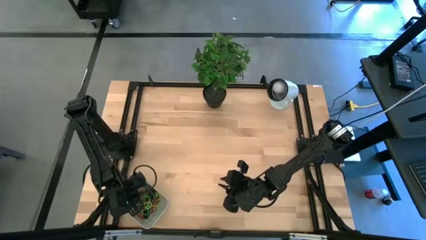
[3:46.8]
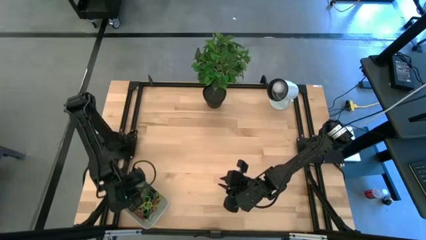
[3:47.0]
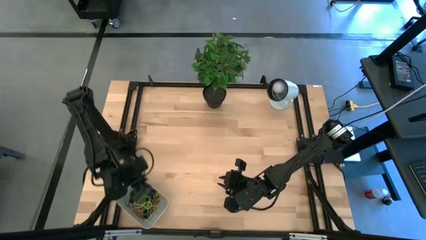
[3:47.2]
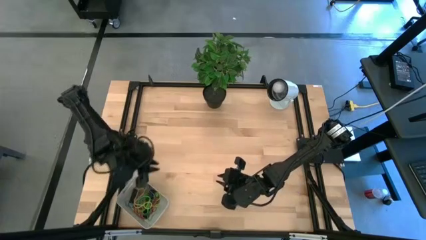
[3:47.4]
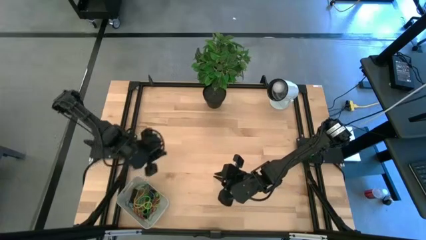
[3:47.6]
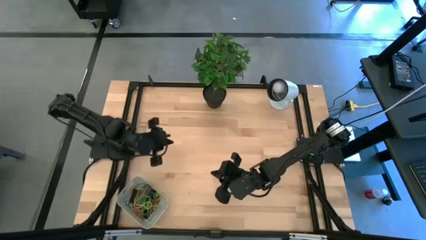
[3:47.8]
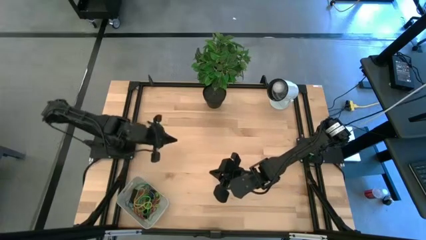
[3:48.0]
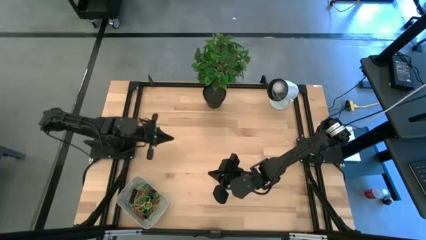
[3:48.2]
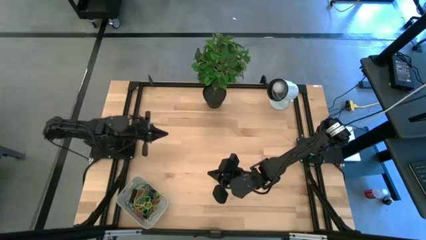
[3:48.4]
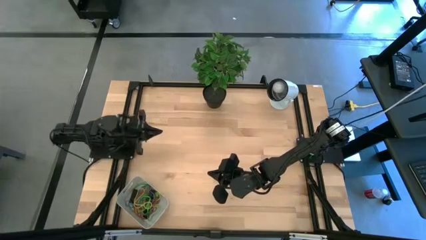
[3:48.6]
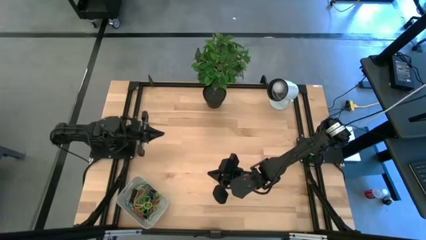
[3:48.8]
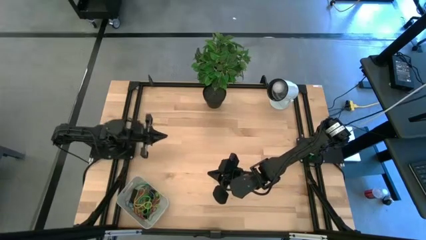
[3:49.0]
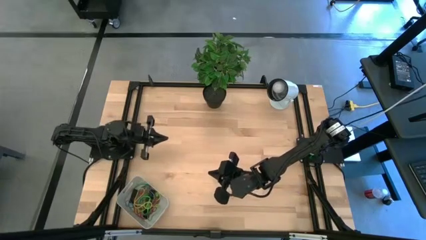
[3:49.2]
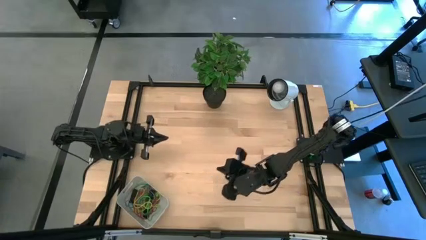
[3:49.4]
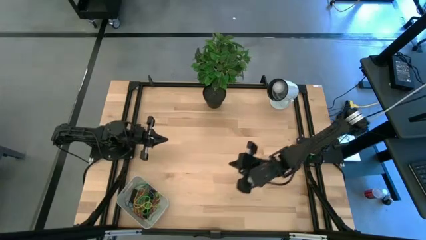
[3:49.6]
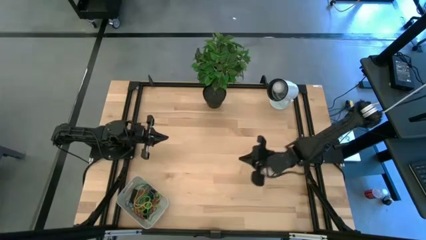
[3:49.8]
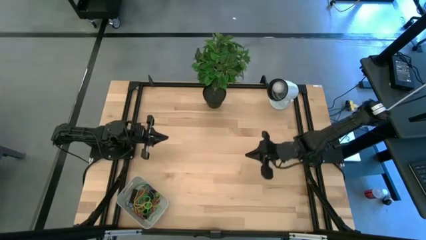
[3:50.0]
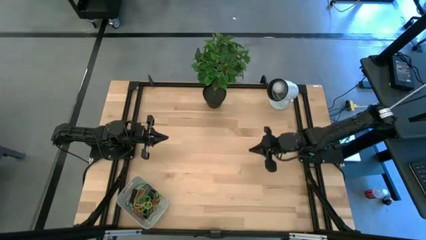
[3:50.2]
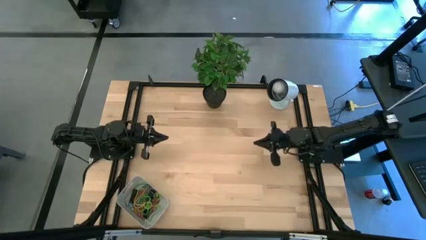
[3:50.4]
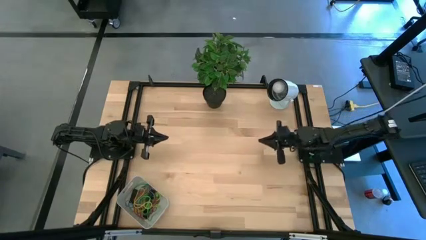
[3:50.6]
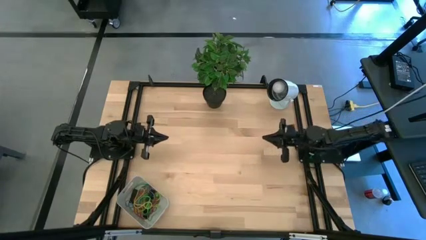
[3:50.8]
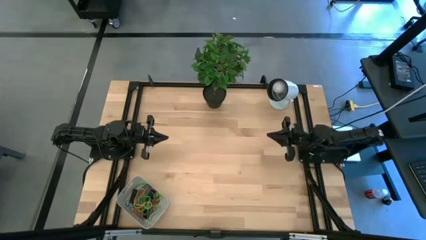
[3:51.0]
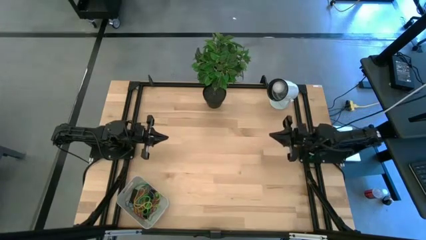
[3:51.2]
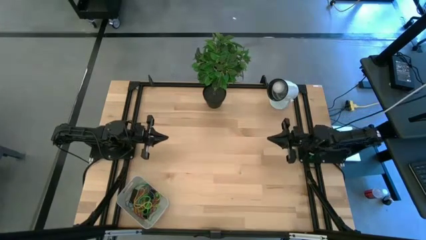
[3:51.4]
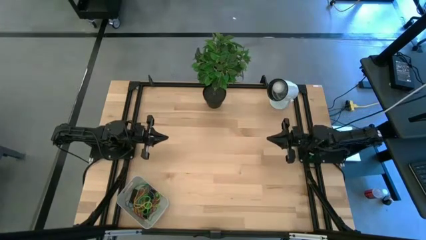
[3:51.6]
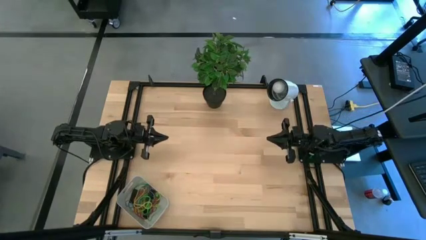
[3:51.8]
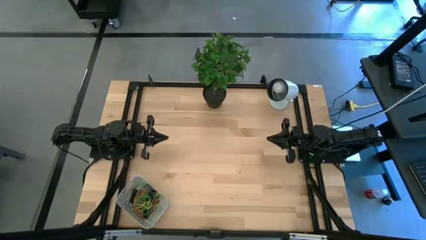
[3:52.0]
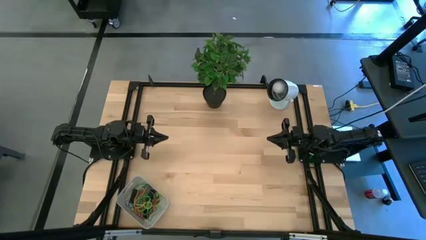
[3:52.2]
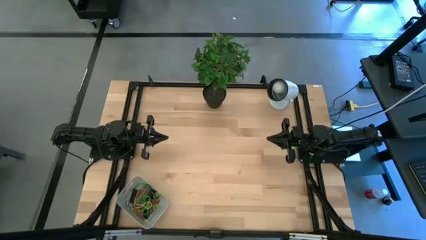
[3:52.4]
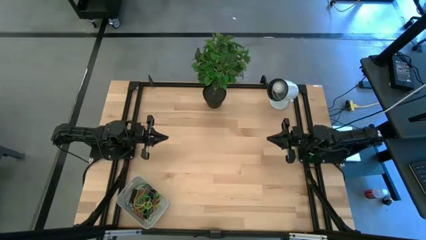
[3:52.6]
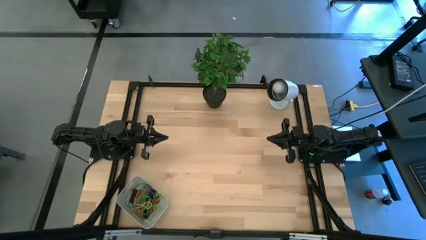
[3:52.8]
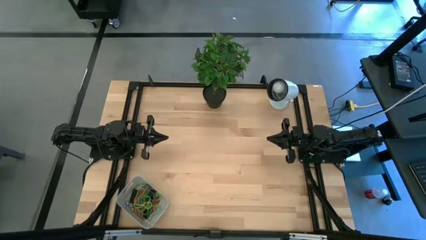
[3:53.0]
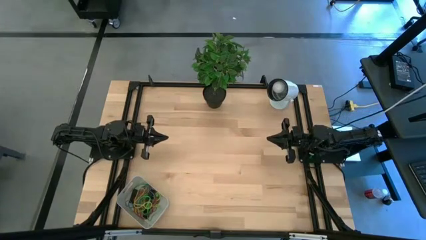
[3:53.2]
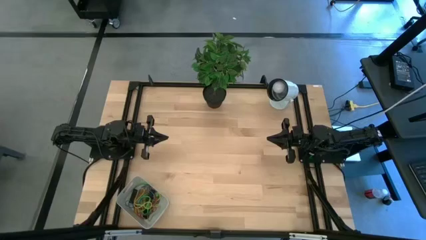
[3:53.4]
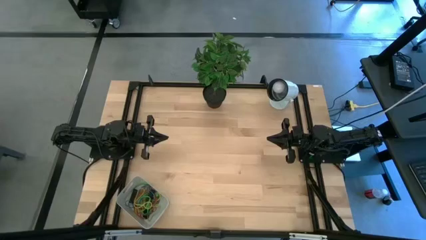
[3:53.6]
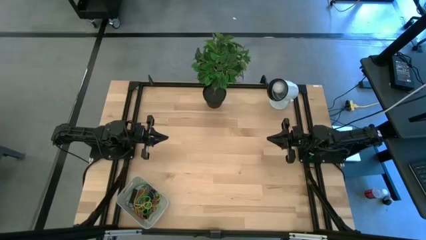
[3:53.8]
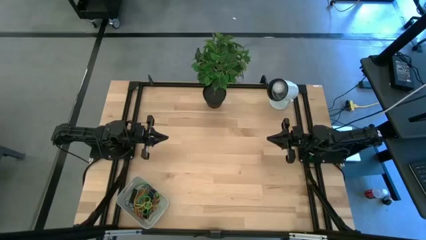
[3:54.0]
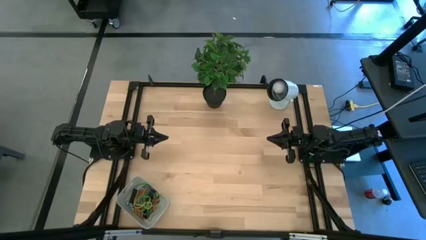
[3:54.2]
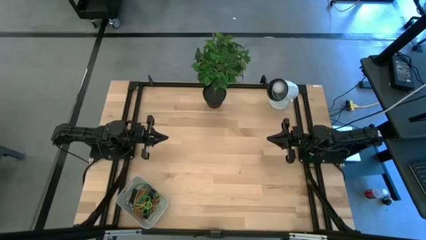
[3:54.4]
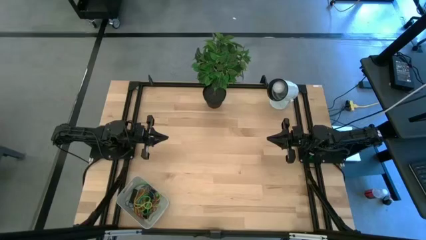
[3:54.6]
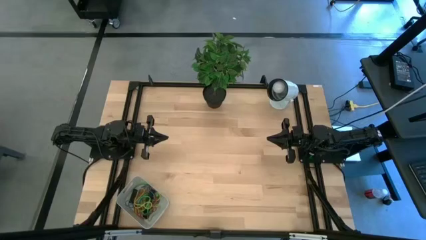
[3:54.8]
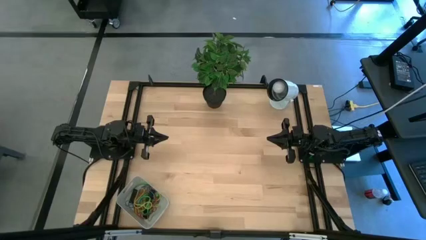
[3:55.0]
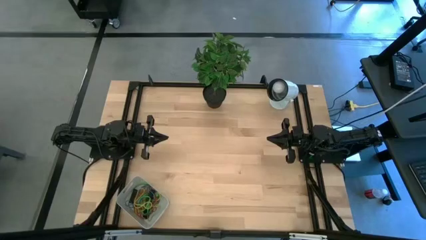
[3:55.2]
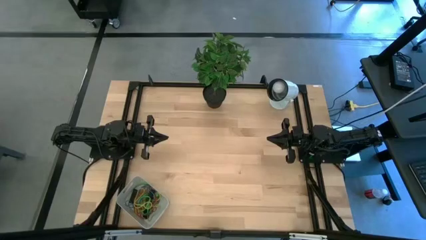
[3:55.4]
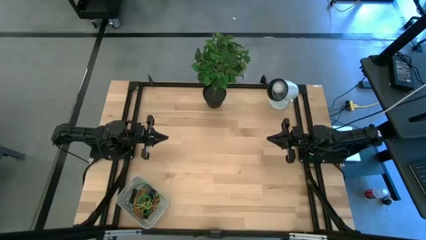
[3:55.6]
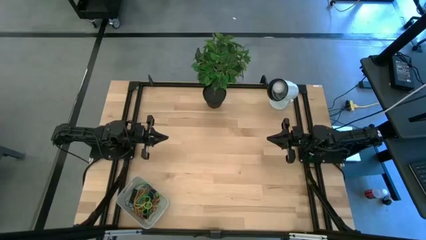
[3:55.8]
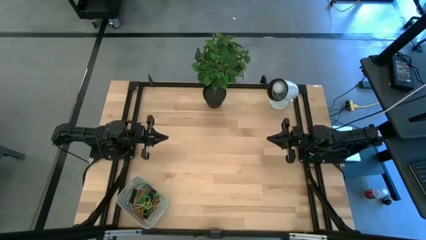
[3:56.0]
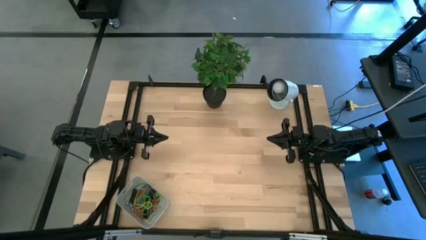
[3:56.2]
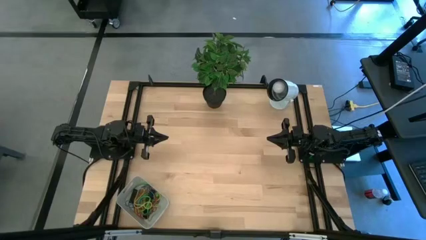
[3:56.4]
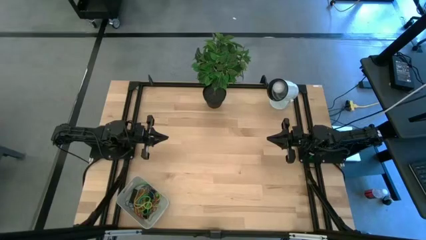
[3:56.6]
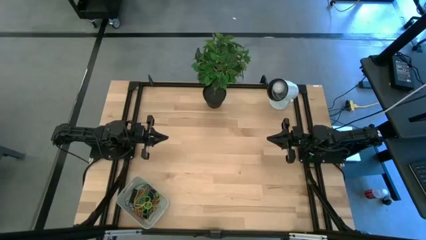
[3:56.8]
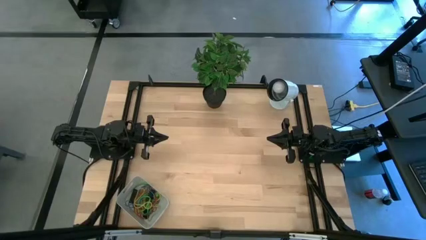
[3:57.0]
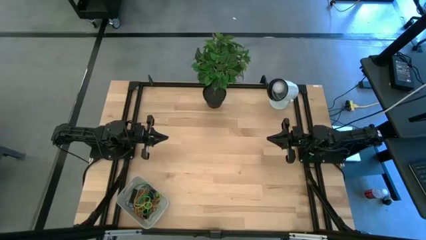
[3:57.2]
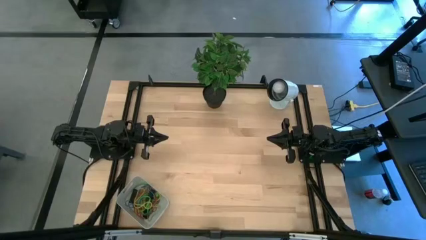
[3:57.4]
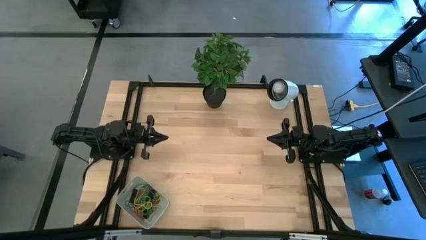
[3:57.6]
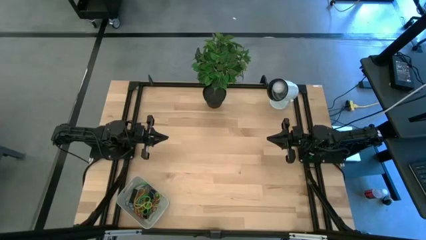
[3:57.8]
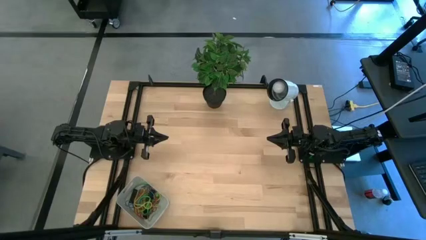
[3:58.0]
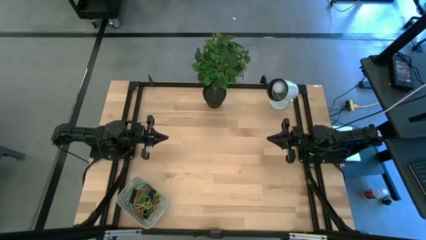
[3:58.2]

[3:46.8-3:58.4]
Task: Pick and place rubber bands into bin
Return to Home Position
